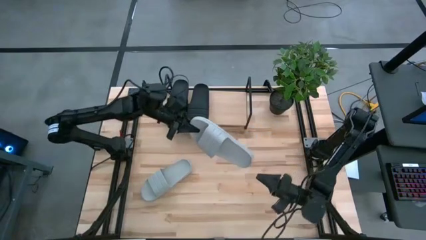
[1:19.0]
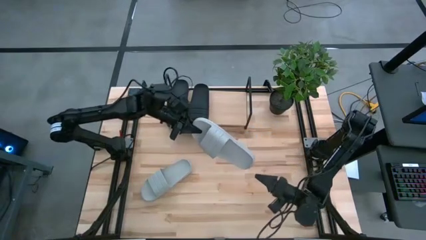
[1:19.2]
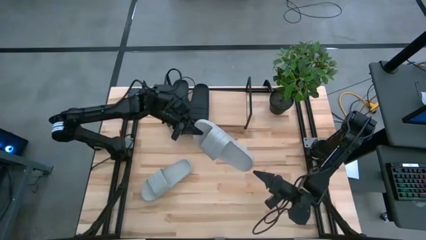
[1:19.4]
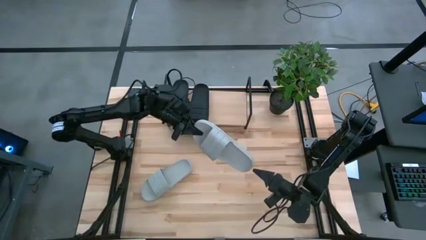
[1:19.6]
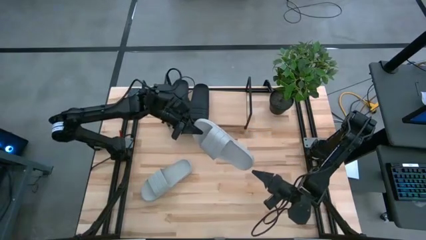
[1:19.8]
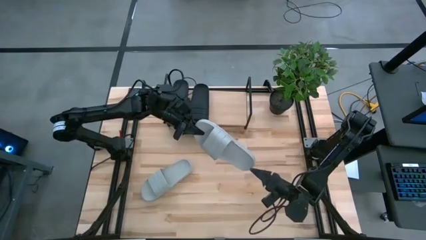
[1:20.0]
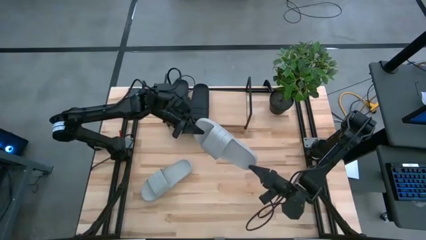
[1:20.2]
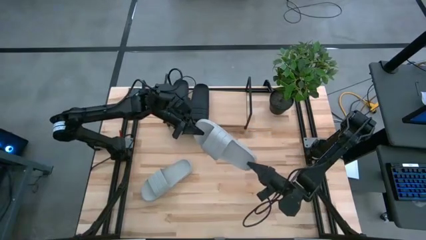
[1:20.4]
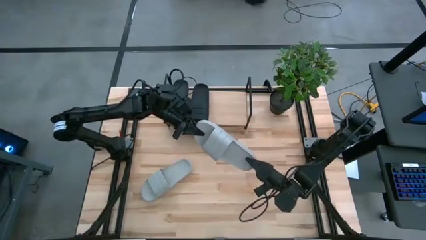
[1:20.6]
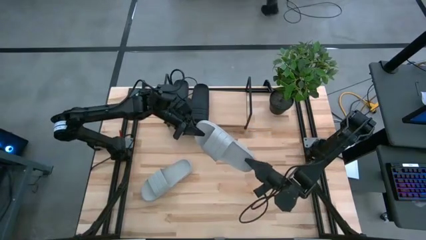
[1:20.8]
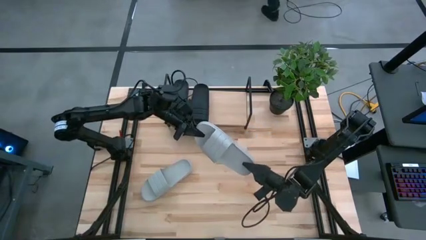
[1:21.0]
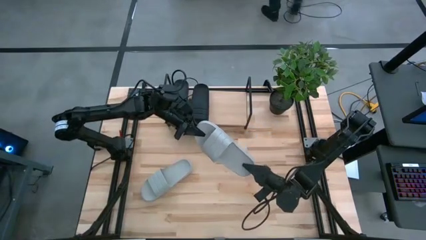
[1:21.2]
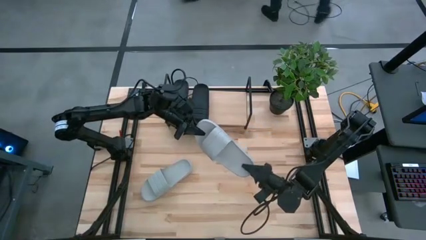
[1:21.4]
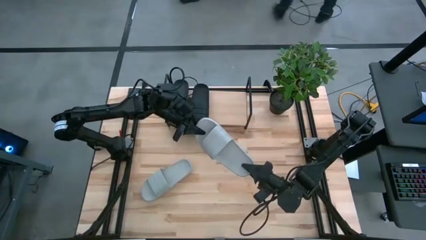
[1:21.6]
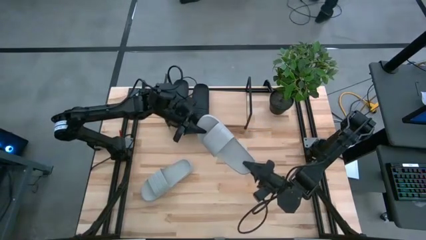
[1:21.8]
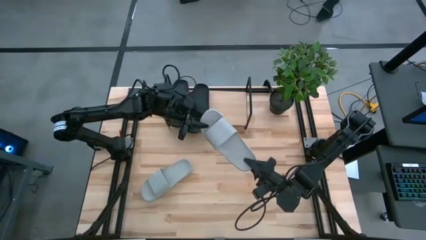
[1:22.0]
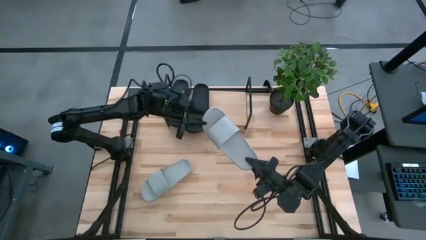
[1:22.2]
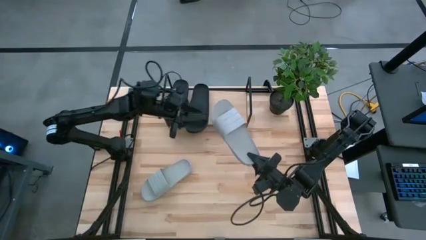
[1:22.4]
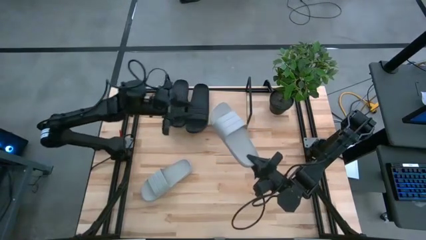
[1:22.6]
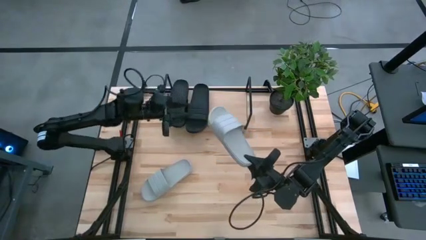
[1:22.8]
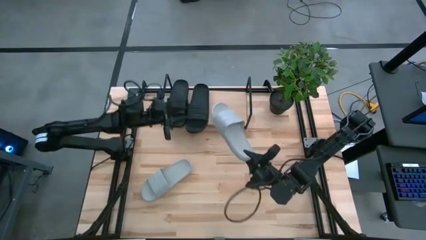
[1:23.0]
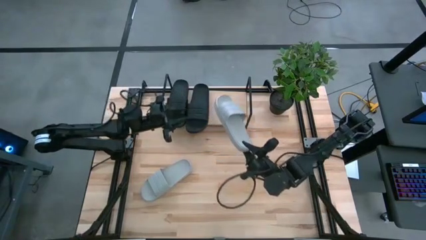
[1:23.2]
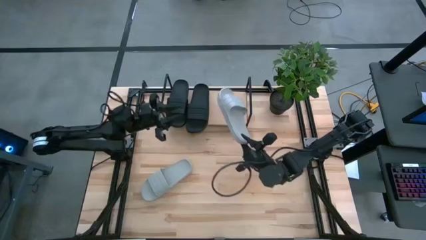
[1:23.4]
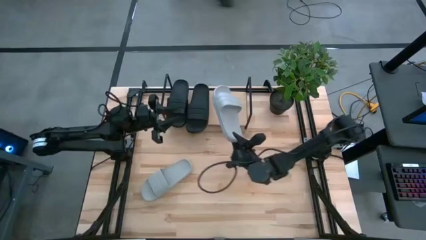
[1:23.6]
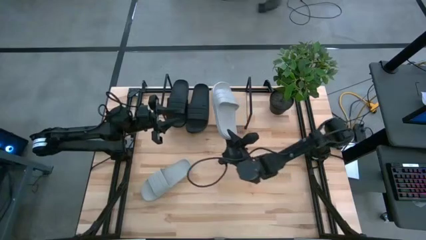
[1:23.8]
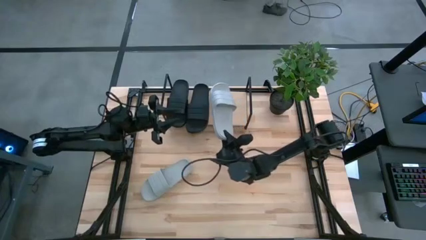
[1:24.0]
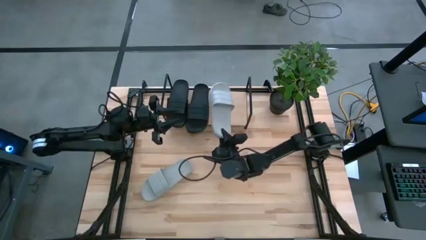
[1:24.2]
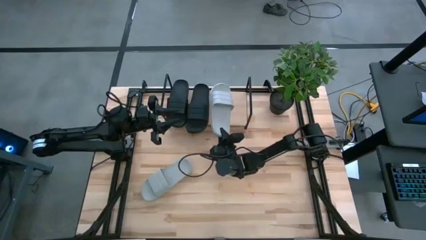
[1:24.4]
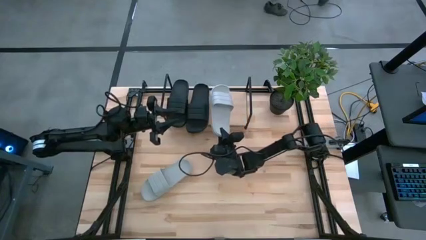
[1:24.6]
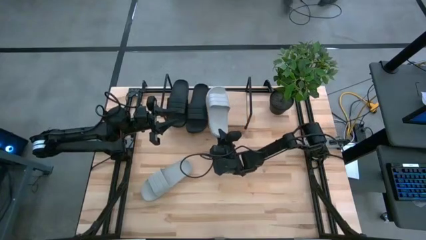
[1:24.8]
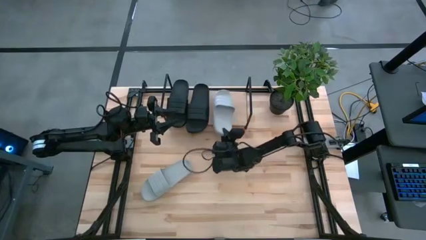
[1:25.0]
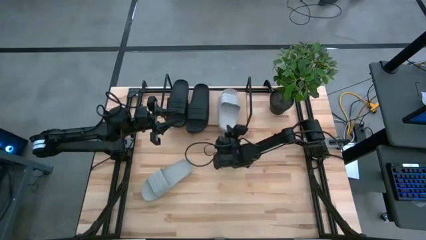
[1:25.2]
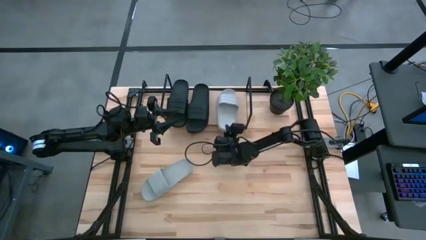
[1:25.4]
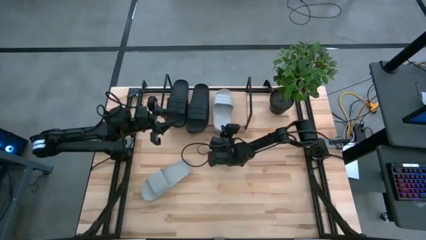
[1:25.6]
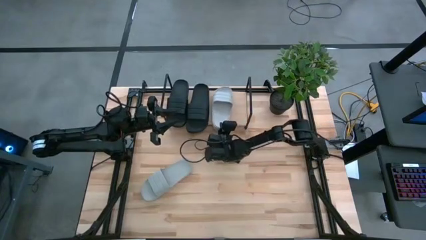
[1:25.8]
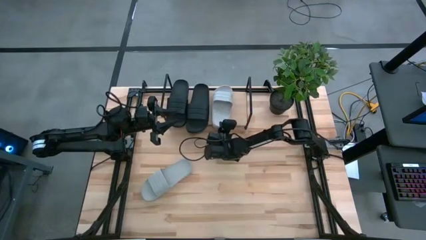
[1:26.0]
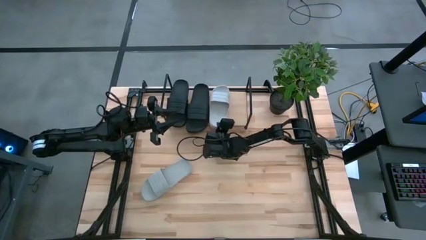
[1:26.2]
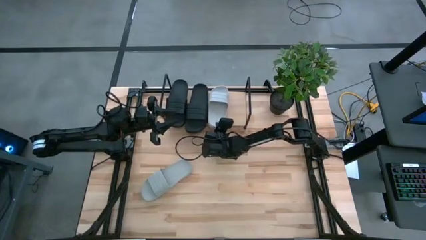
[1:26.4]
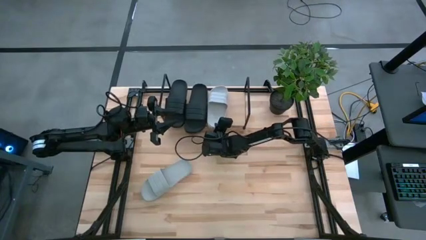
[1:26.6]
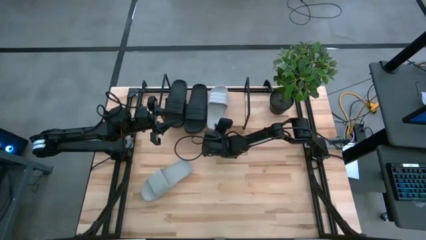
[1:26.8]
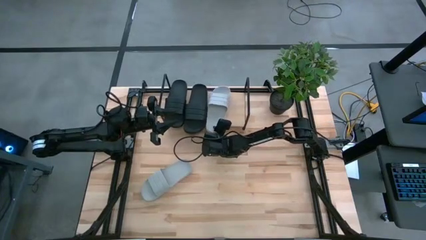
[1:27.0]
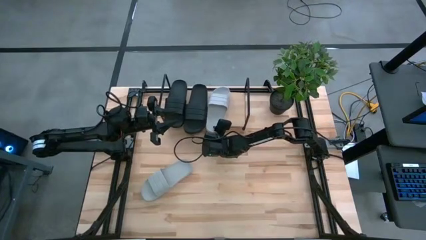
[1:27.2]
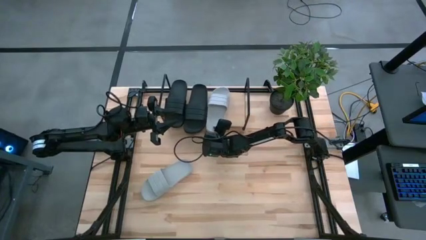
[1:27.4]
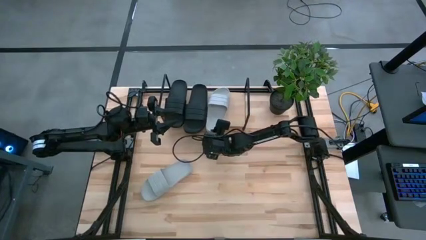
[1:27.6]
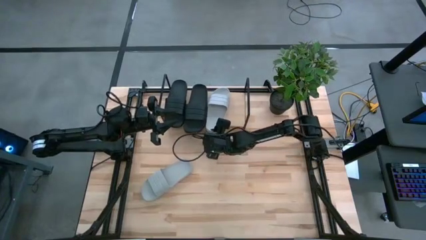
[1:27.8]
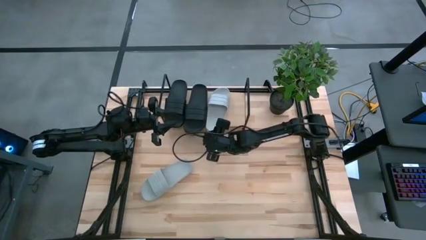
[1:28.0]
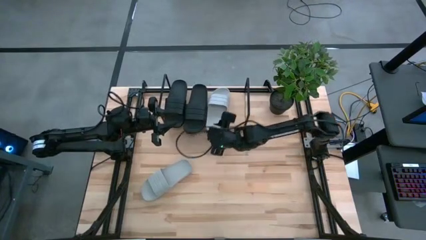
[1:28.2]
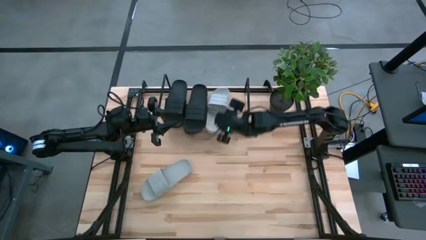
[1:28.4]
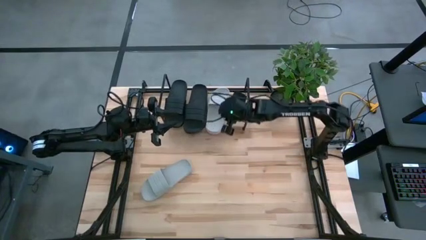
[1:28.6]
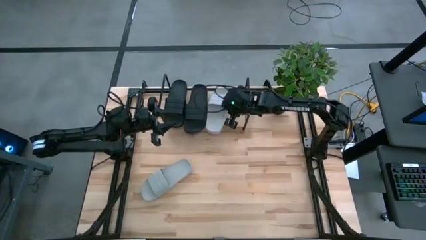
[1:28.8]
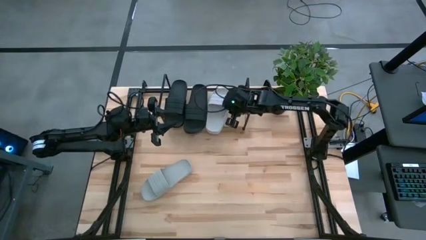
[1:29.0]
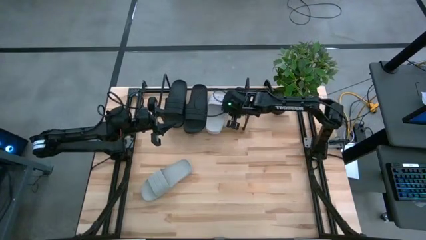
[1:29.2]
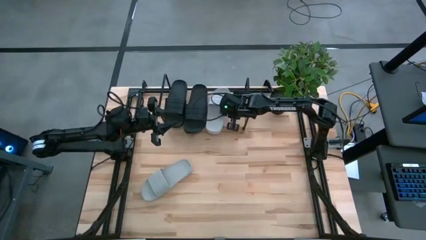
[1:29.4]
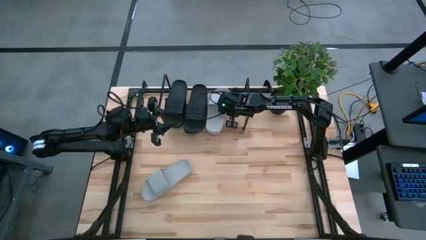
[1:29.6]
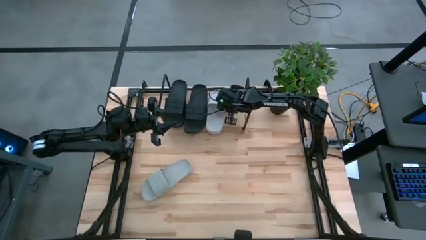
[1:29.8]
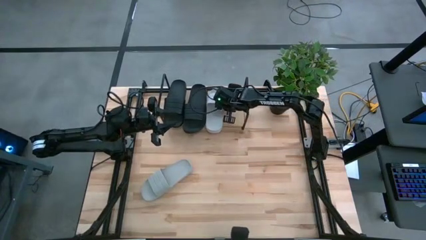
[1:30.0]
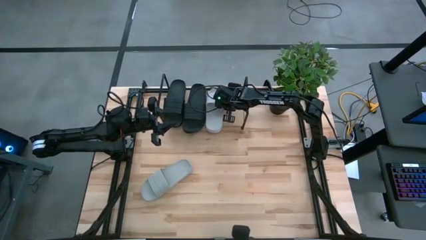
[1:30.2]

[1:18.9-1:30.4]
Task: Pick and place slides into the shelf
Put the right gray slipper on the shelf

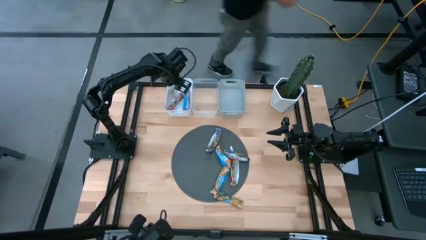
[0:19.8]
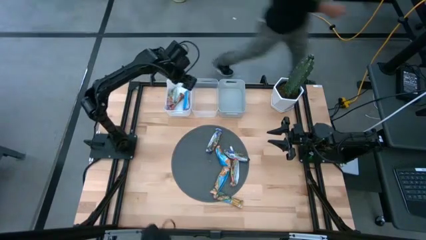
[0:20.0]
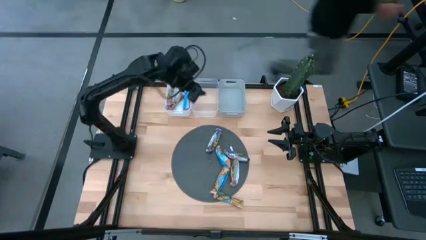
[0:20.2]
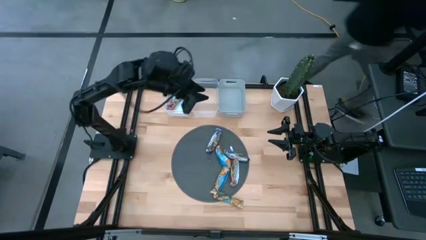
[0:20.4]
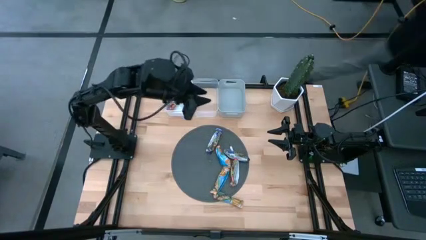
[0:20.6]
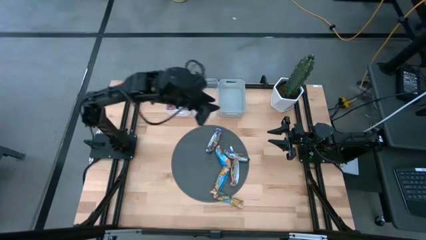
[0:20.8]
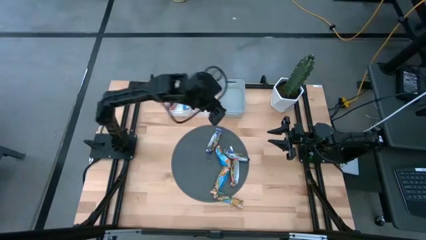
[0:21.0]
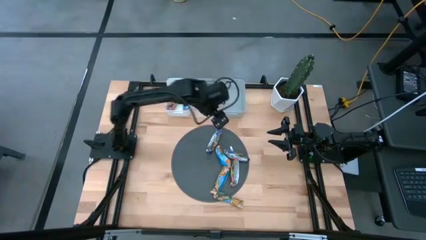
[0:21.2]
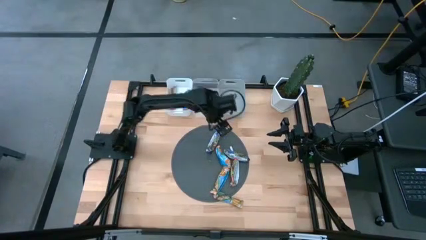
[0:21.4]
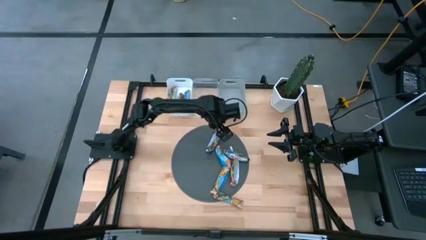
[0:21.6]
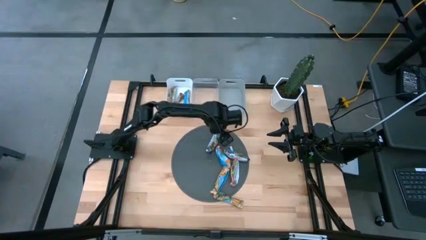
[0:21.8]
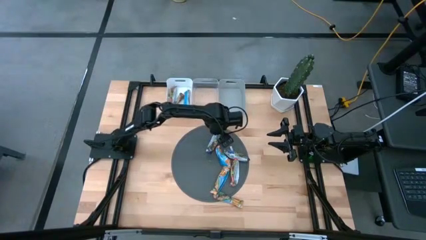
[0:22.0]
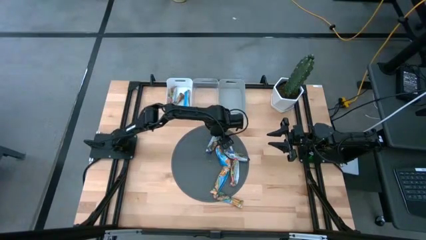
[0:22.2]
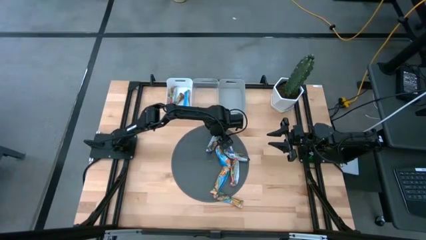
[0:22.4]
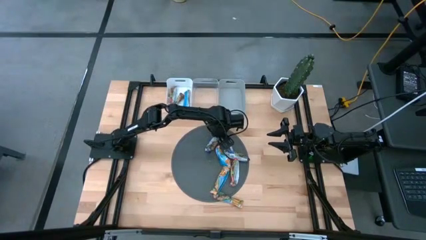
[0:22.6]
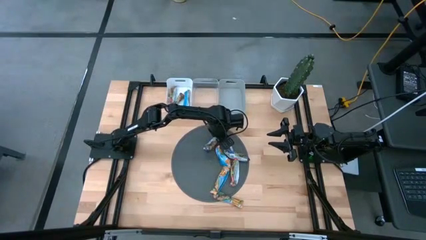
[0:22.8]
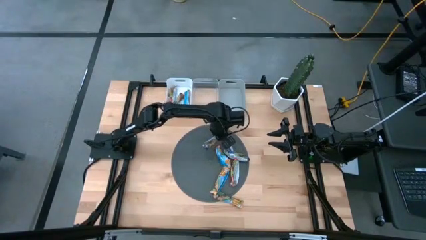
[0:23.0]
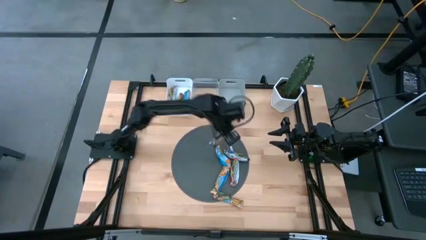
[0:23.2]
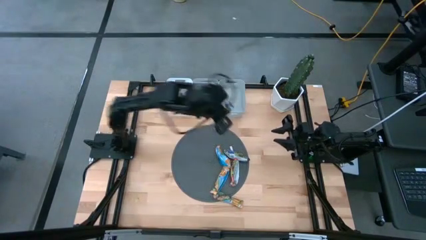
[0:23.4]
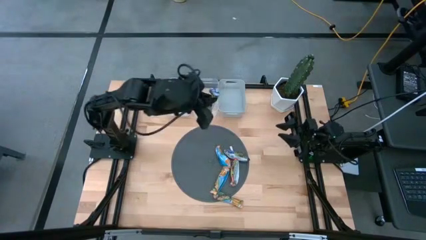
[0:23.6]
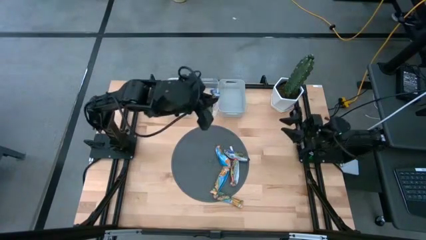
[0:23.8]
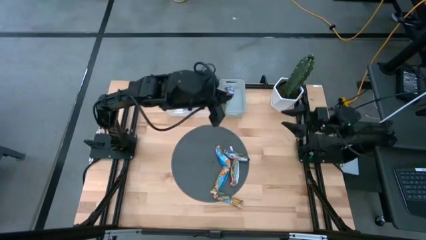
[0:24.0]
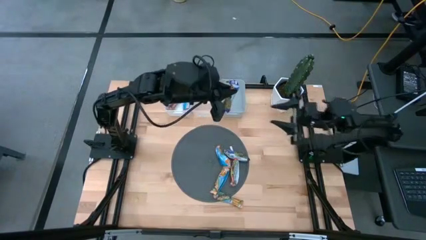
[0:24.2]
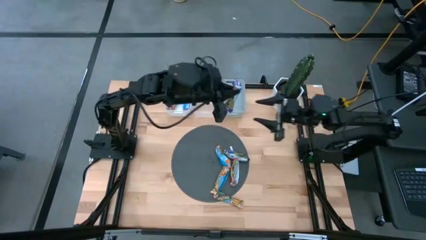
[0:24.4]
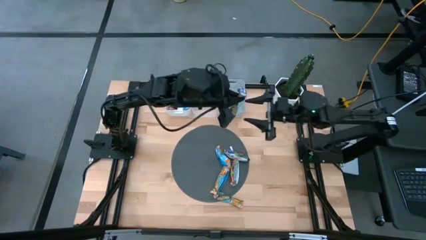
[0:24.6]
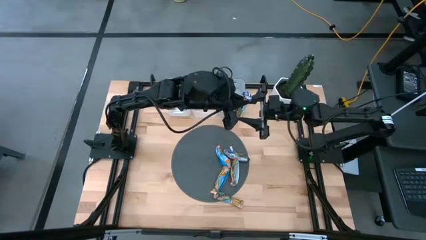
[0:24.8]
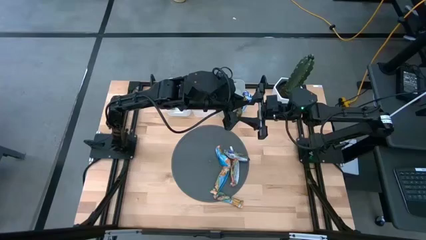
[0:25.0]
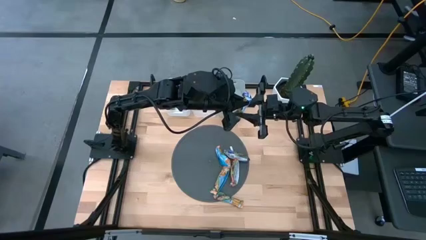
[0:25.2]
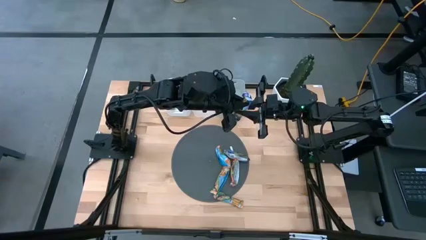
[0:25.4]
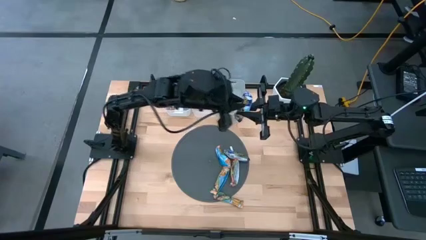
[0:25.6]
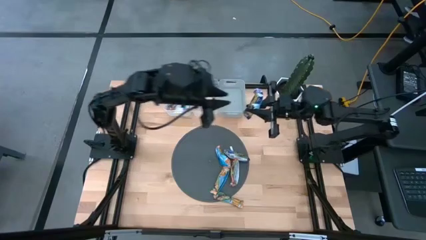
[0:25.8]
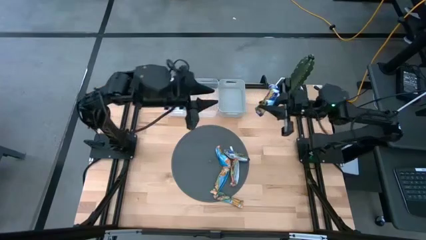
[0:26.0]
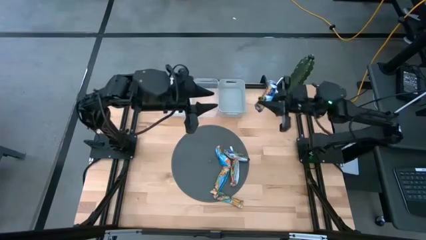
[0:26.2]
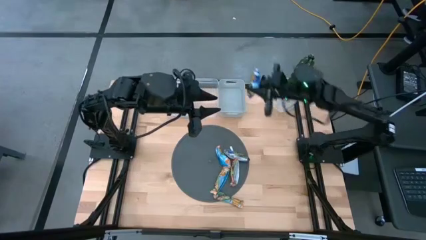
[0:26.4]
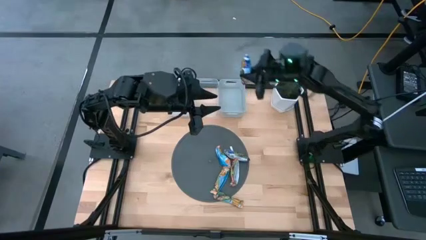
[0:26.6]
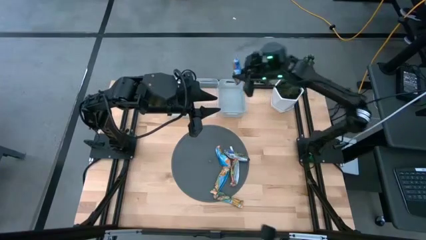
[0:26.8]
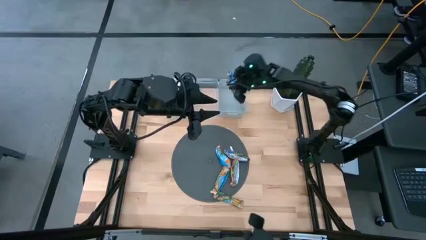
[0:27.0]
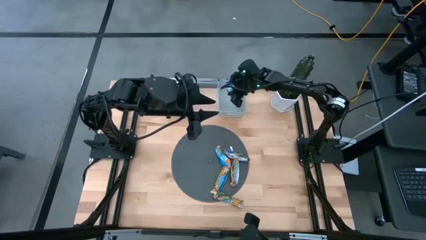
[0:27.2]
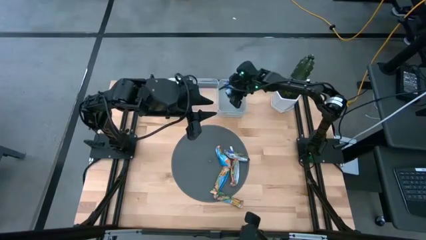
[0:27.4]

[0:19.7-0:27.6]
Task: Pick and place Granola Bars by type
Put the blue granola bar into the gray bin
